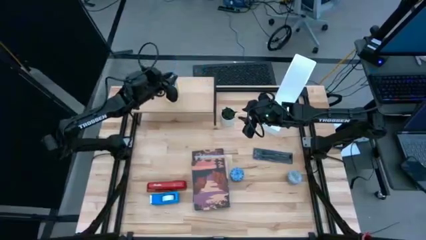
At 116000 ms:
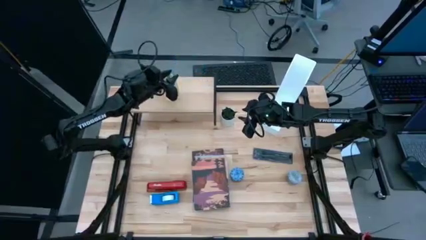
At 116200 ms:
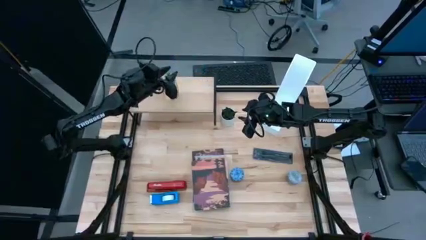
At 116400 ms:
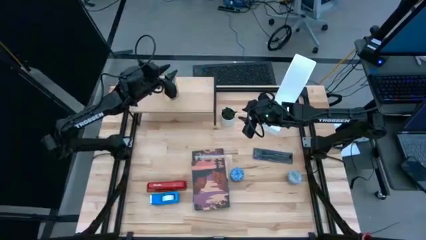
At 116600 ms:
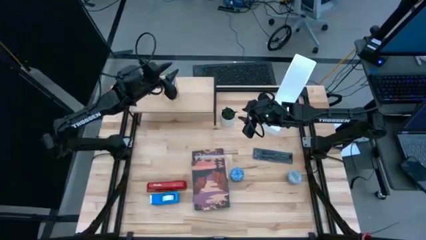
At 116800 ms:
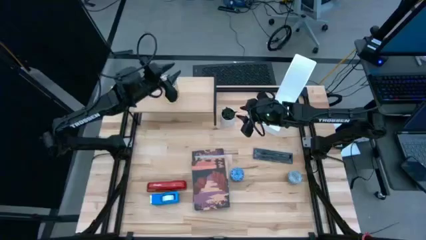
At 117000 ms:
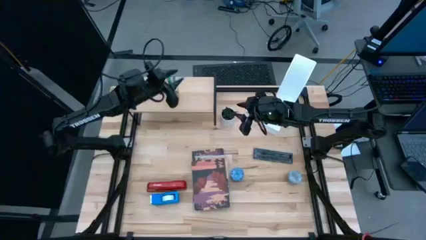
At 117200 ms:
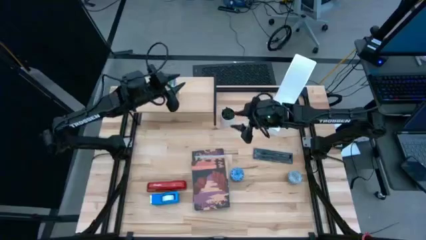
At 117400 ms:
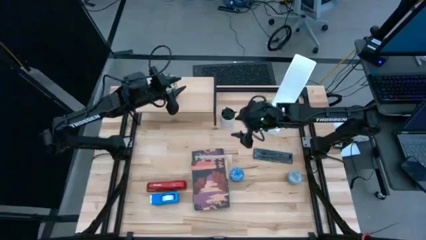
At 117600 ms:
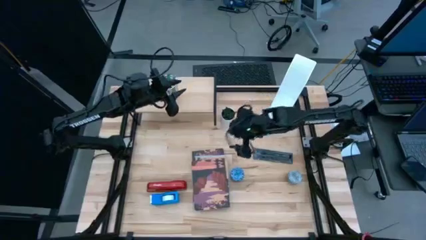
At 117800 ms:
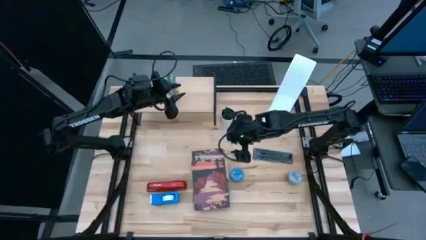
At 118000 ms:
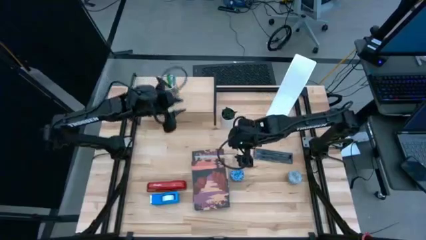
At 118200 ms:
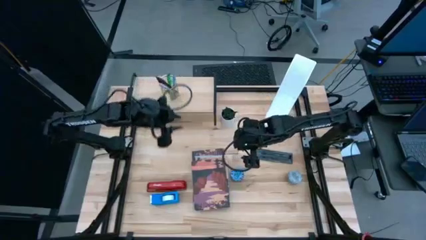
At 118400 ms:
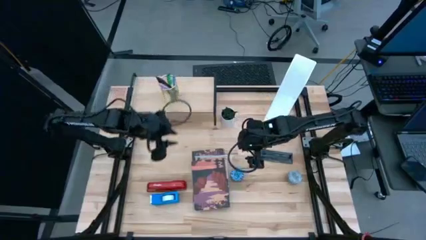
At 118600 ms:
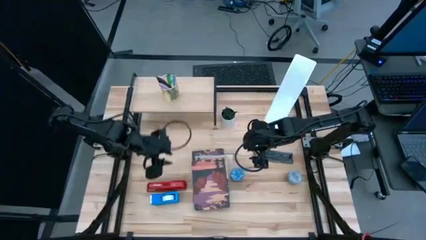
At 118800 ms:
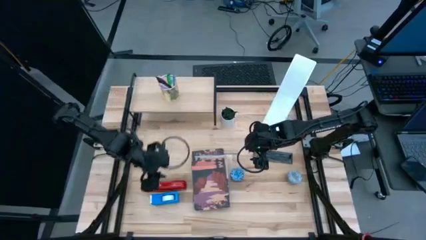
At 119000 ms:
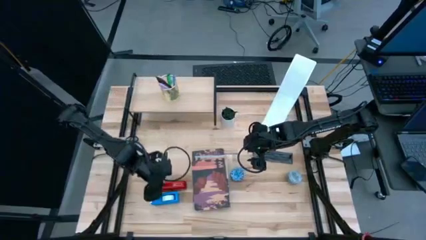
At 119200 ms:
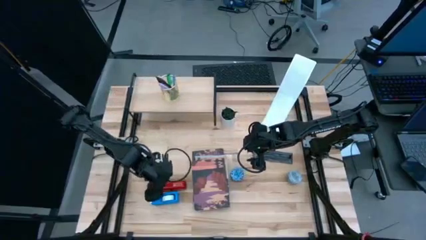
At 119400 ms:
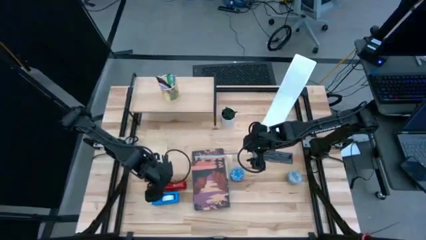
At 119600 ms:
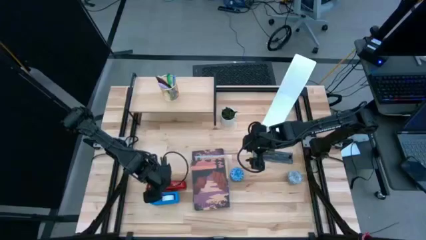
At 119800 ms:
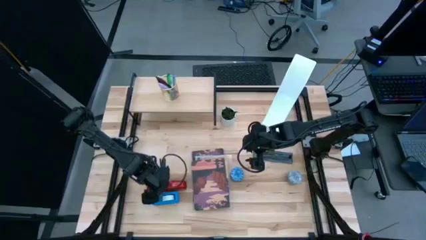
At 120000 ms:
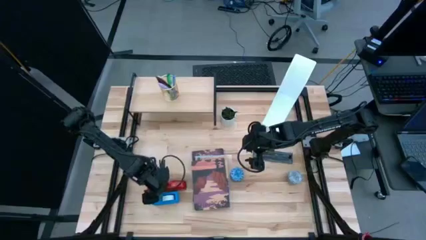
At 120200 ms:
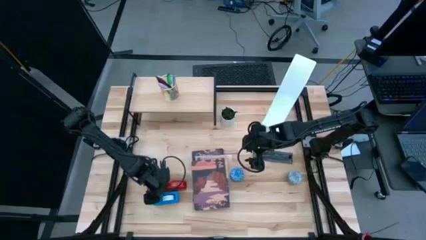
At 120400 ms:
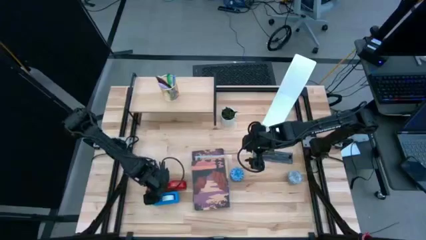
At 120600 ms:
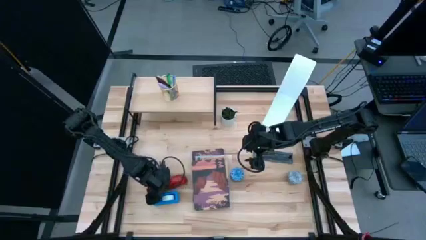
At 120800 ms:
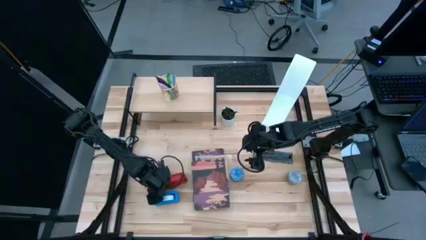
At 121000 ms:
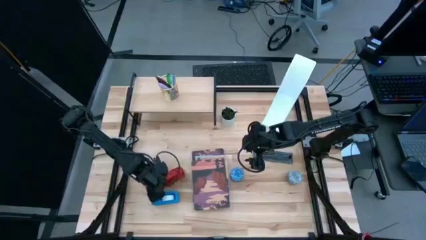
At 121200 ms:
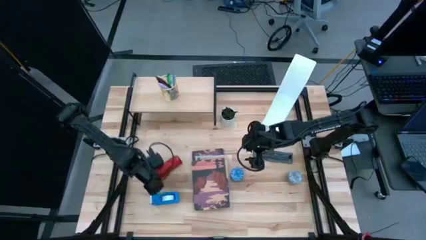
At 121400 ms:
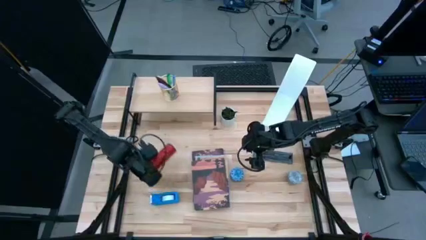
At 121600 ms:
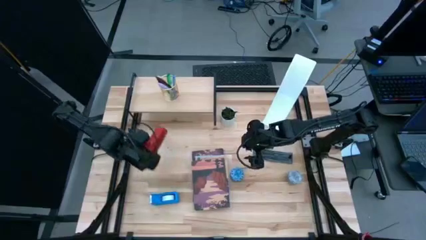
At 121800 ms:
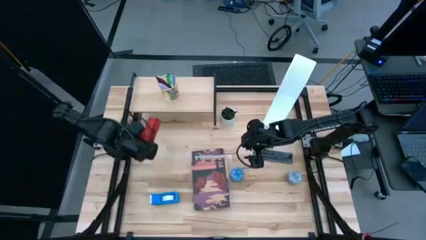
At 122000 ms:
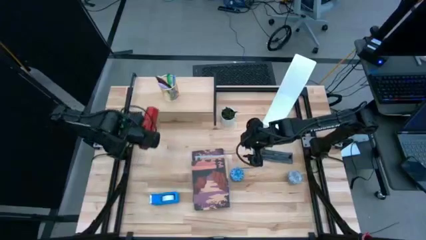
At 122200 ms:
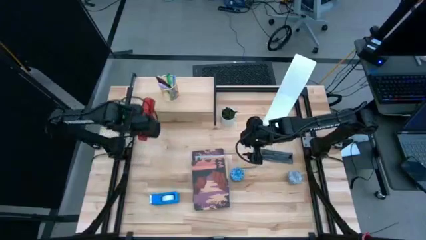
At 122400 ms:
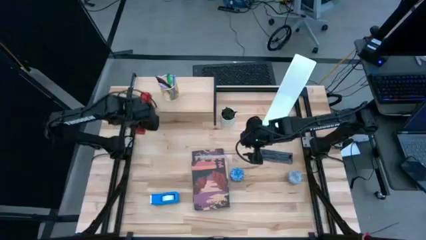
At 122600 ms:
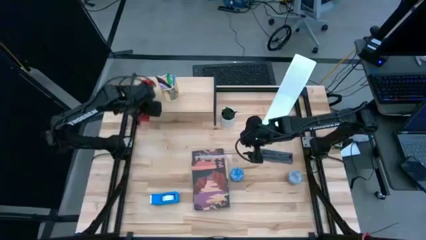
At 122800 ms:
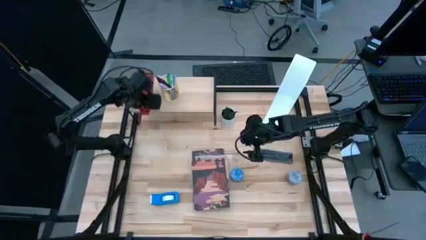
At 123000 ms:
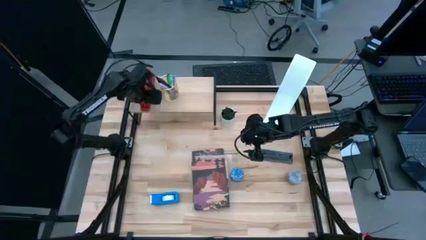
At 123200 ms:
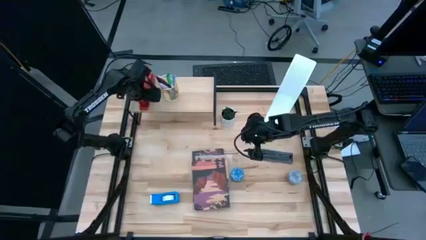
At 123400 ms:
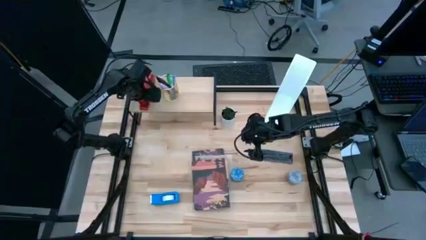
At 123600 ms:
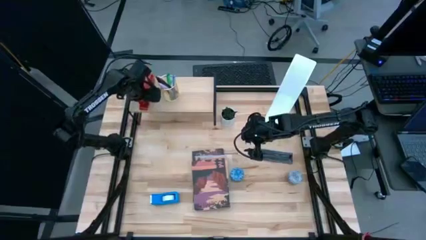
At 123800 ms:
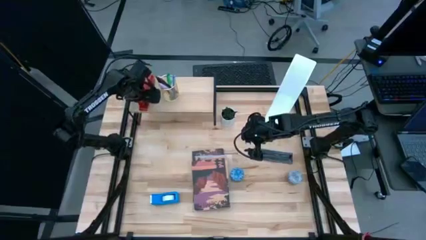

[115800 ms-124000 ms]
Task: Stock shelves
Put the red stapler on the shelf

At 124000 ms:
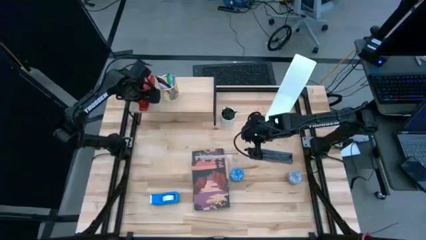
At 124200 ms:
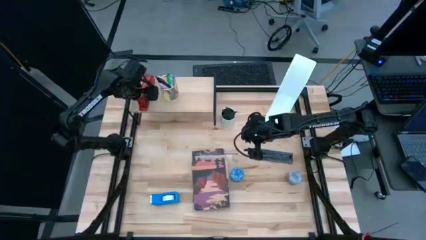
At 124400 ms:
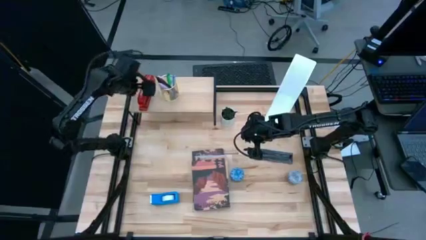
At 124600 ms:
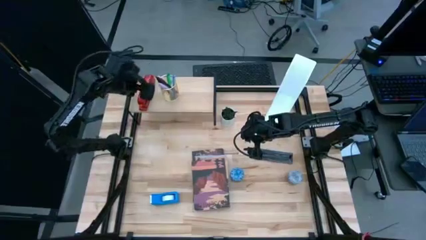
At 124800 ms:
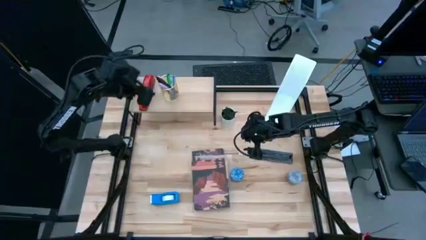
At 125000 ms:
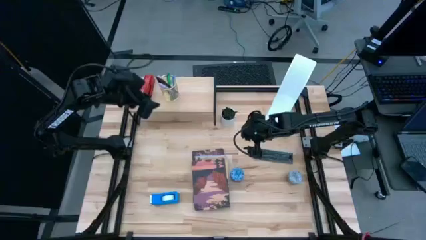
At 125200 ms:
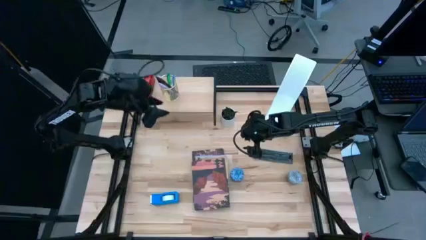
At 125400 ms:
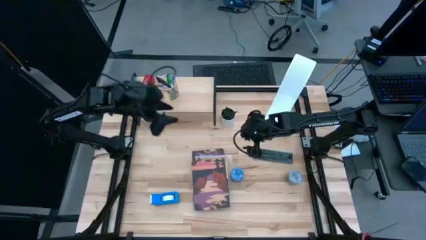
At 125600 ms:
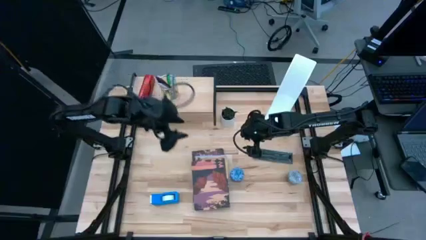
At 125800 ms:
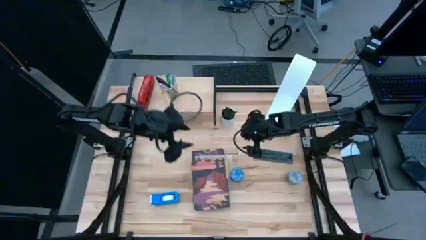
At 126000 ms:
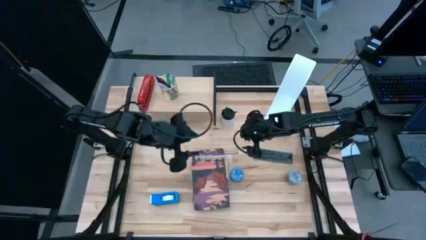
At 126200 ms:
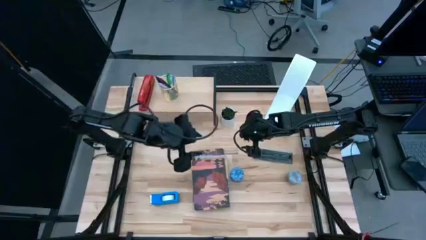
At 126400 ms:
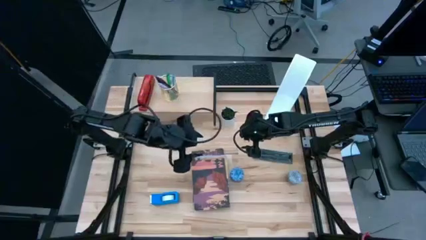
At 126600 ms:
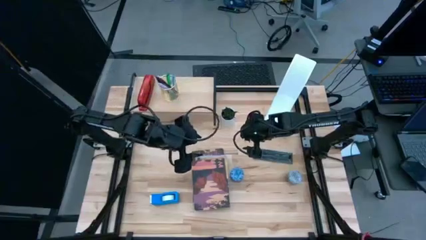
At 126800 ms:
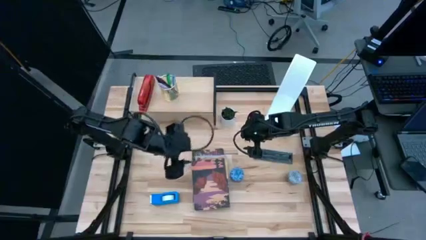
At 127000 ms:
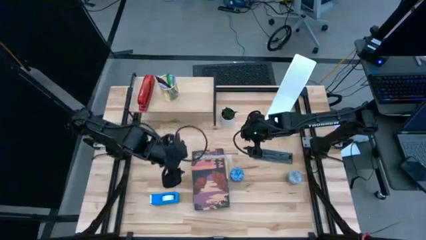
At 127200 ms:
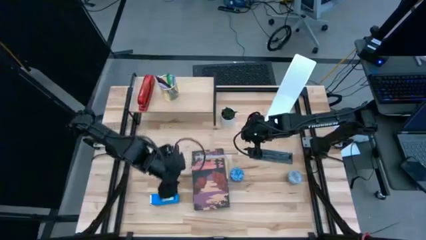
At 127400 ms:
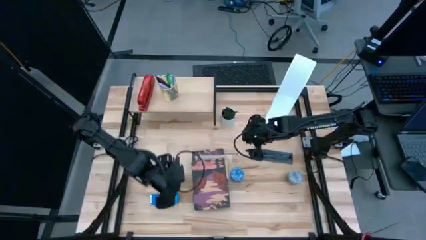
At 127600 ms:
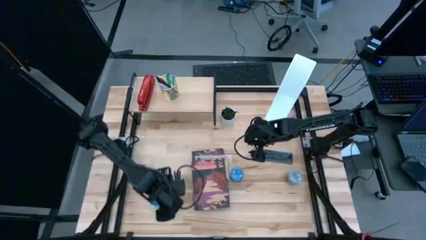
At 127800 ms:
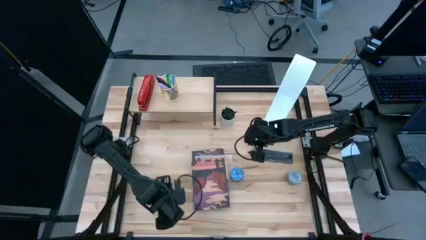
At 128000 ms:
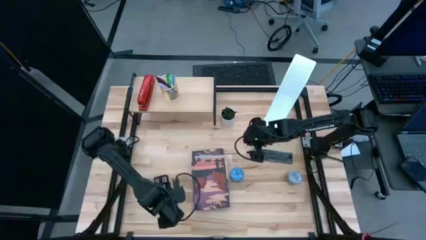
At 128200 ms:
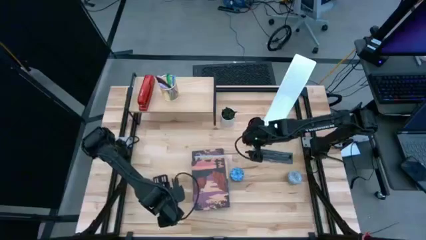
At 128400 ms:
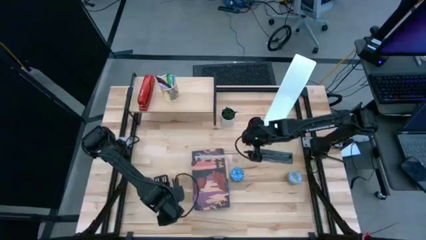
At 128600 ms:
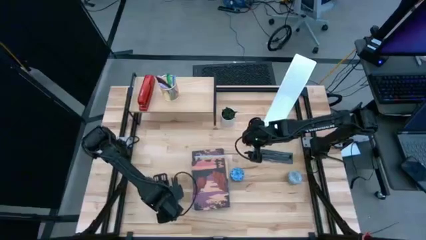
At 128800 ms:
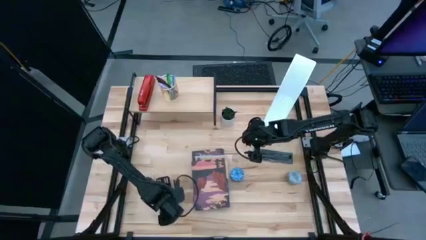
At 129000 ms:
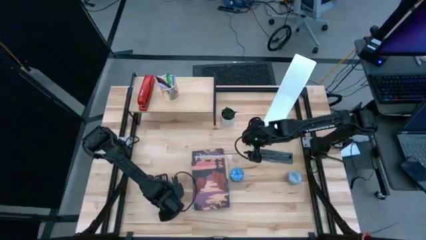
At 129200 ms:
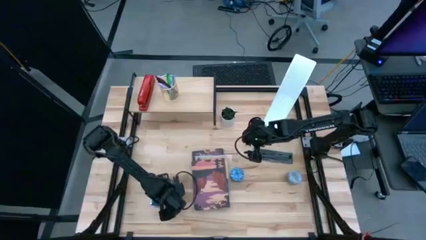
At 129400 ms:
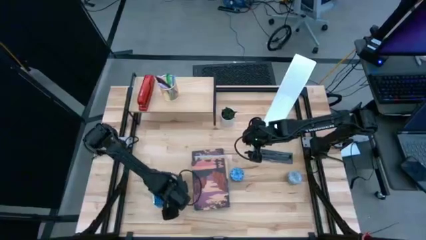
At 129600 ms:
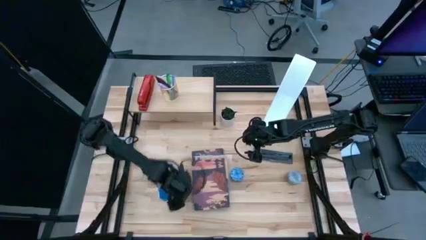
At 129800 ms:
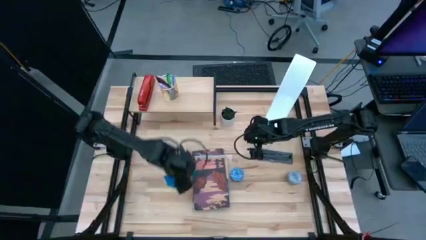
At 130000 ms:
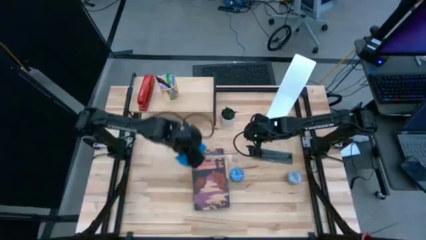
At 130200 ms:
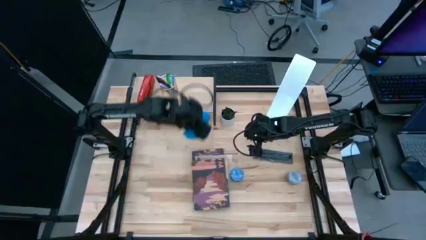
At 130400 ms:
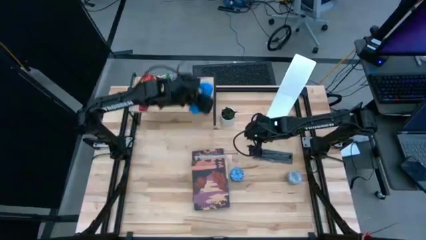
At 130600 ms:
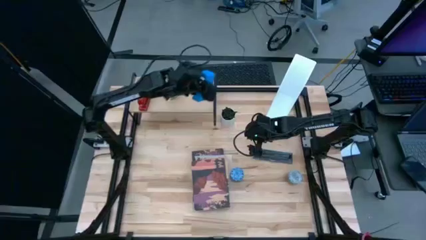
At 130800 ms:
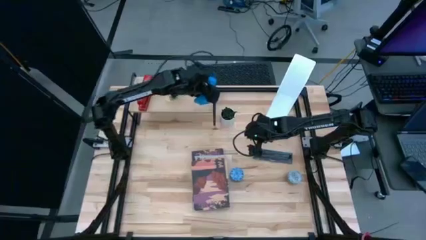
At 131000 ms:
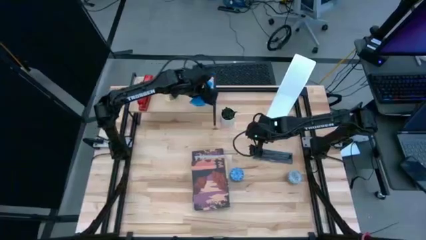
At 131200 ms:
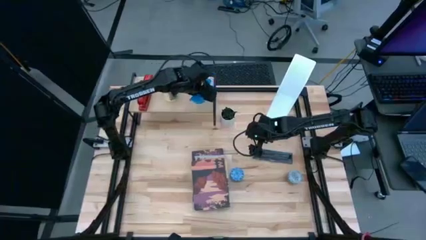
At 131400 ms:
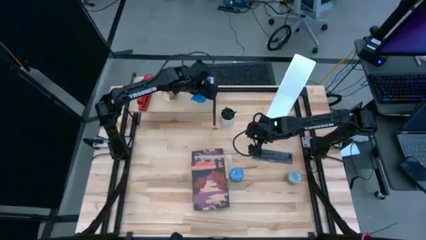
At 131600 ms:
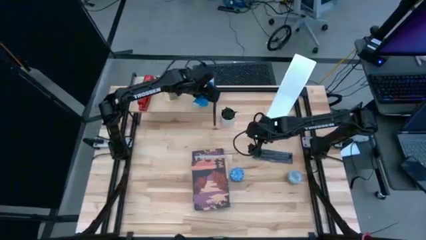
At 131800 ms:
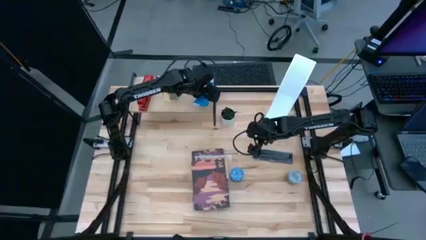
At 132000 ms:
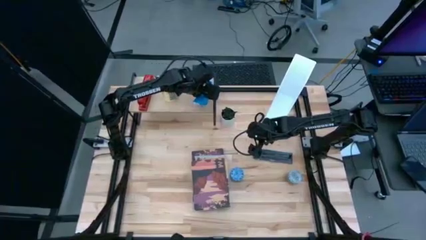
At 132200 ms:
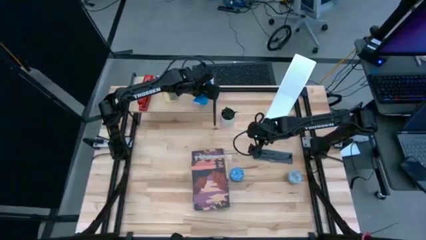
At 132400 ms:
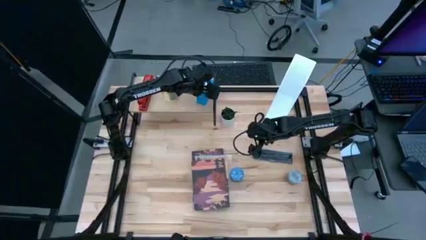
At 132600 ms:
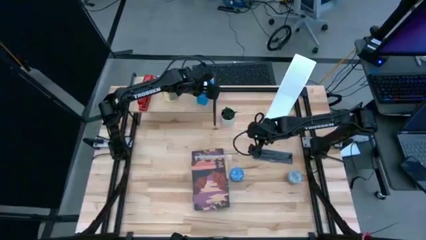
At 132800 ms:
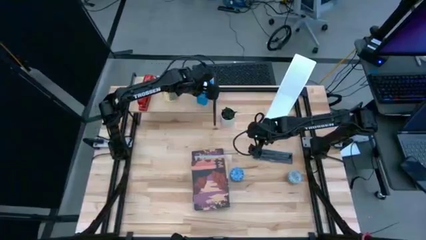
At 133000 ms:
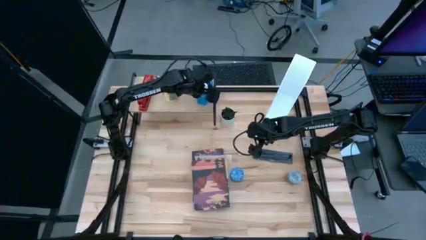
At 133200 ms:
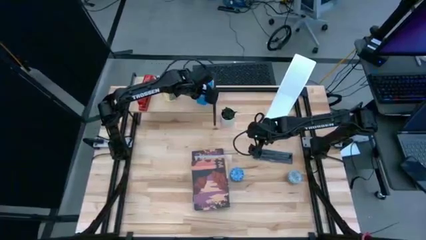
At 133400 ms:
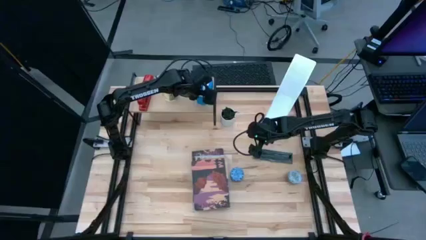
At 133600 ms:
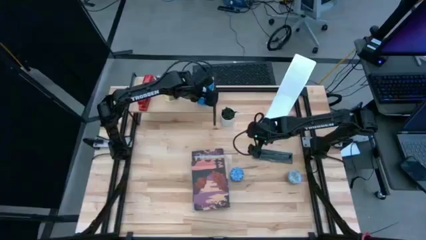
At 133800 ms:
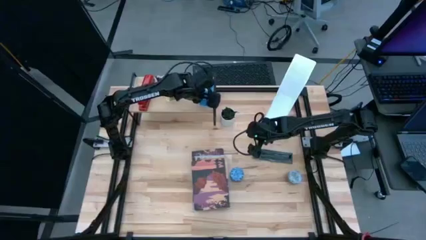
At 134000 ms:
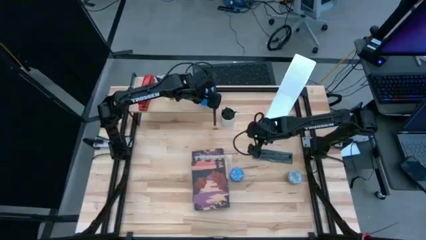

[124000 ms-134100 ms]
Put the blue tape dispenser on the shelf
